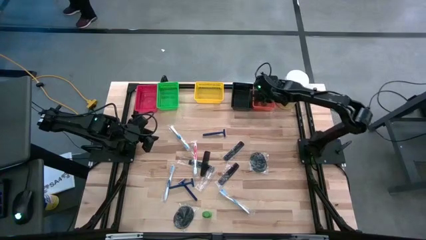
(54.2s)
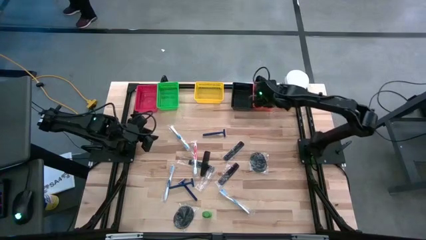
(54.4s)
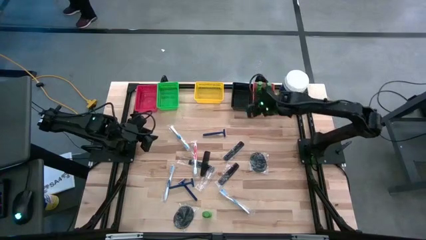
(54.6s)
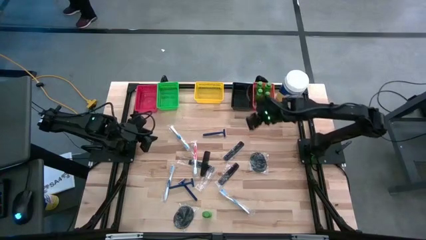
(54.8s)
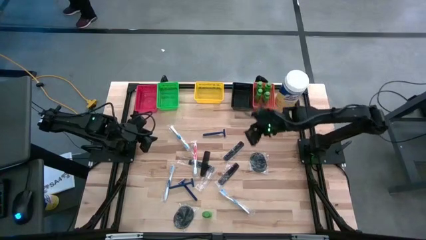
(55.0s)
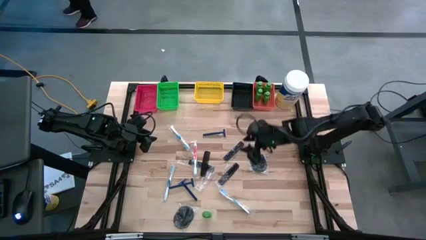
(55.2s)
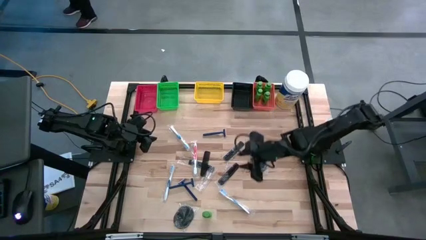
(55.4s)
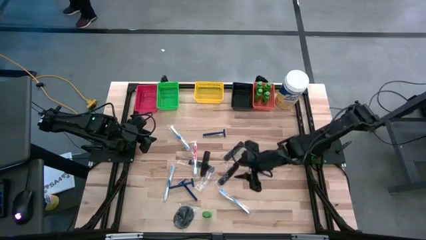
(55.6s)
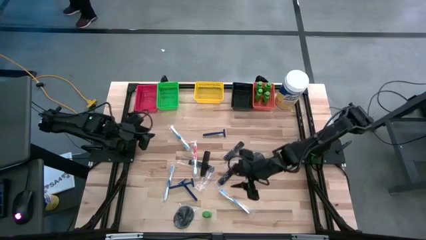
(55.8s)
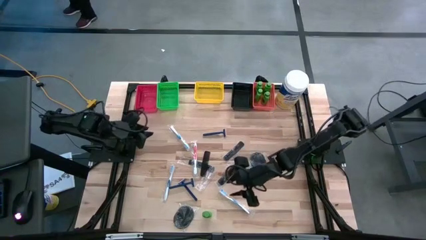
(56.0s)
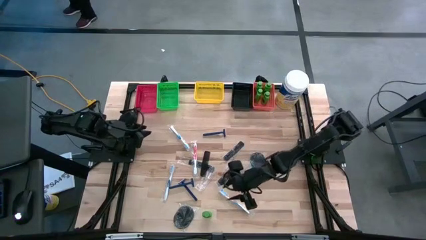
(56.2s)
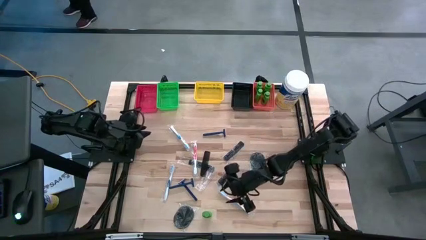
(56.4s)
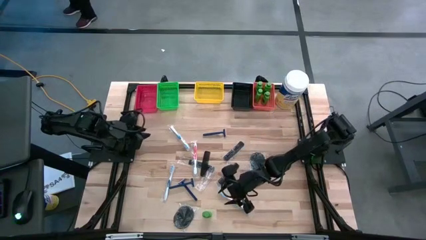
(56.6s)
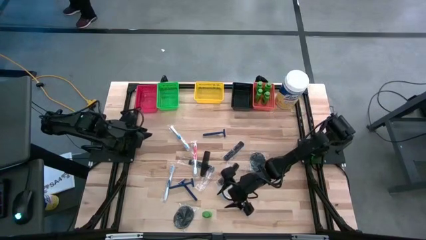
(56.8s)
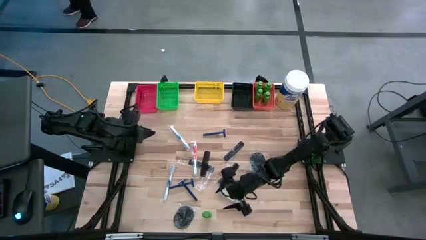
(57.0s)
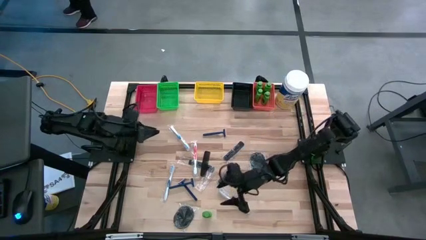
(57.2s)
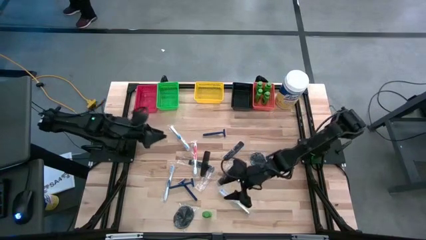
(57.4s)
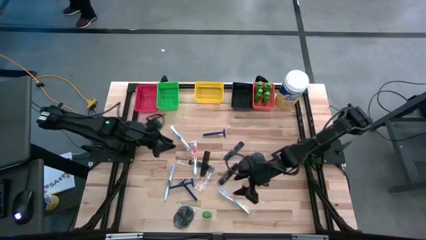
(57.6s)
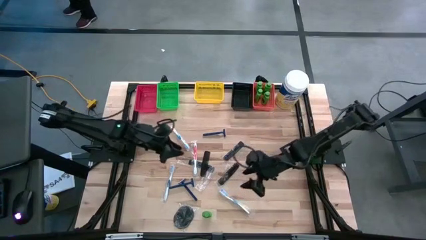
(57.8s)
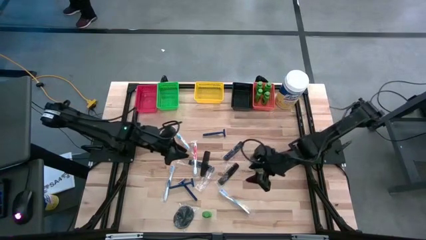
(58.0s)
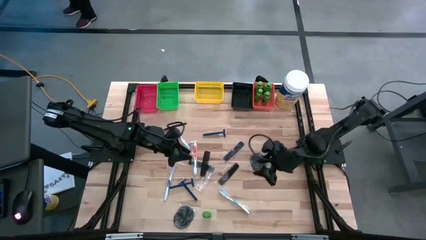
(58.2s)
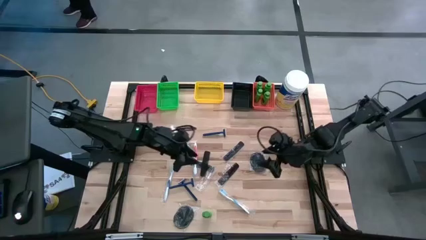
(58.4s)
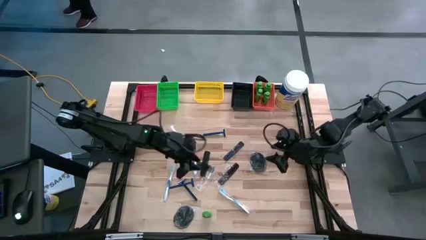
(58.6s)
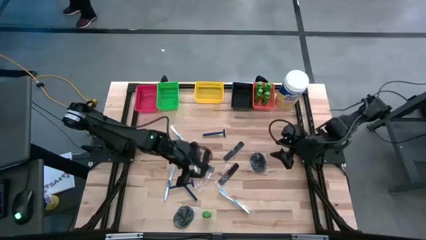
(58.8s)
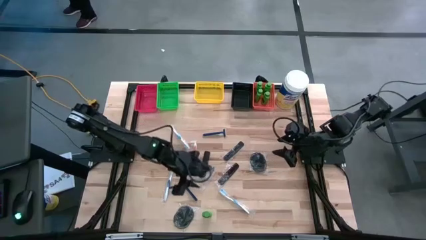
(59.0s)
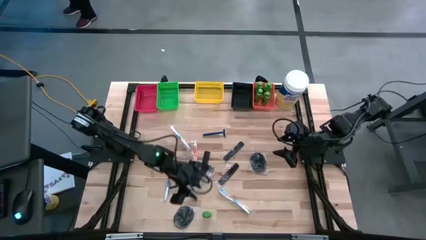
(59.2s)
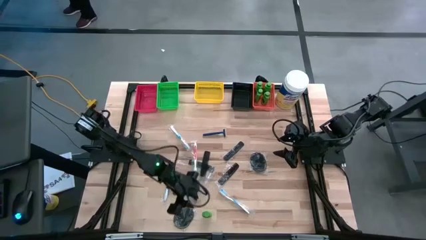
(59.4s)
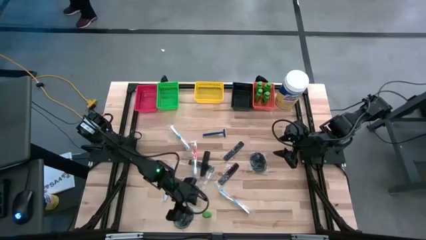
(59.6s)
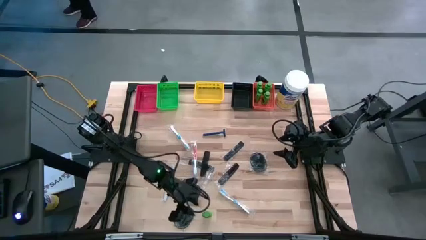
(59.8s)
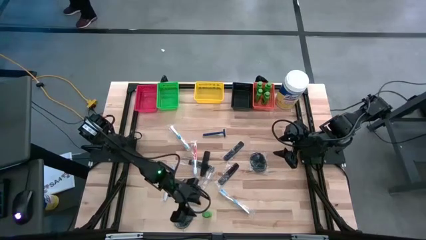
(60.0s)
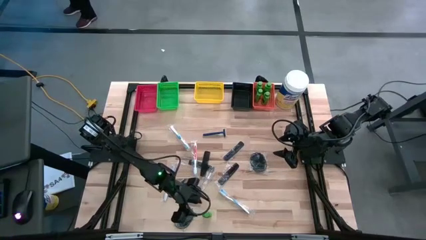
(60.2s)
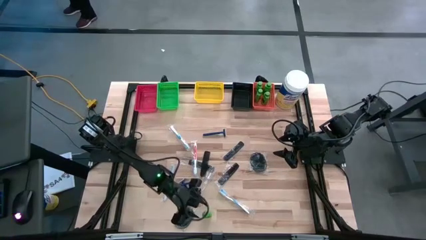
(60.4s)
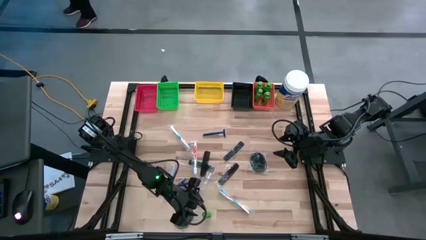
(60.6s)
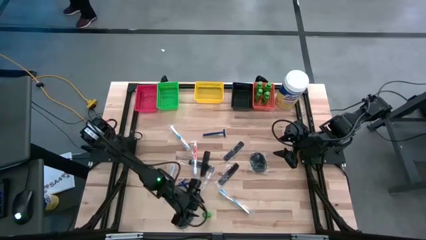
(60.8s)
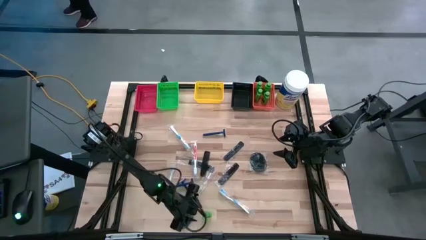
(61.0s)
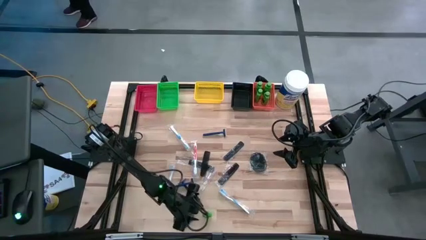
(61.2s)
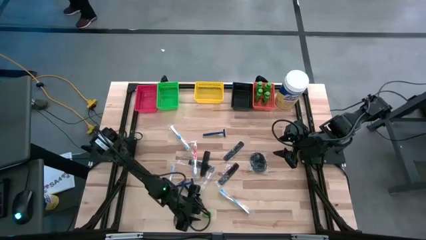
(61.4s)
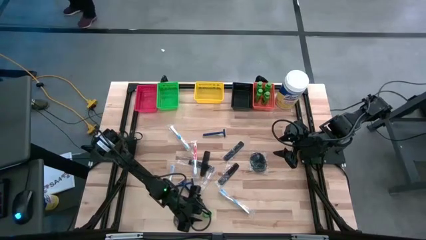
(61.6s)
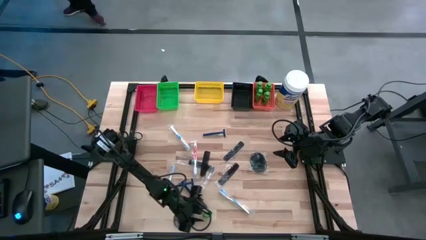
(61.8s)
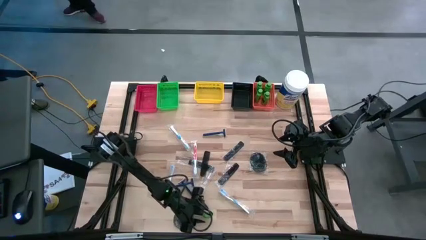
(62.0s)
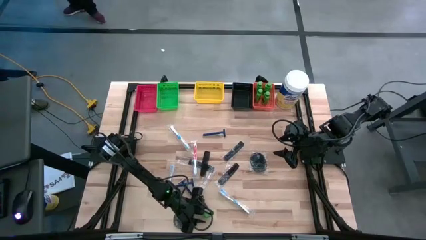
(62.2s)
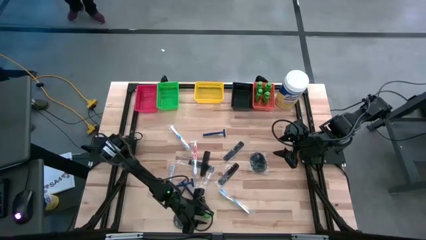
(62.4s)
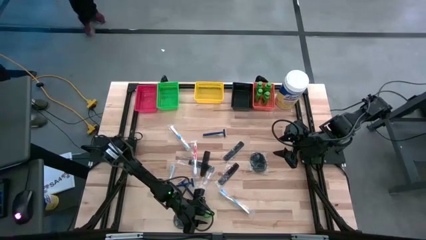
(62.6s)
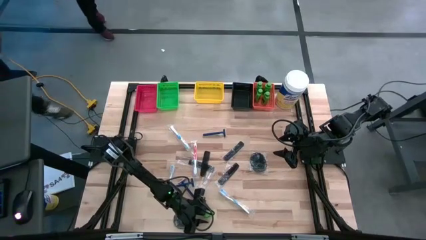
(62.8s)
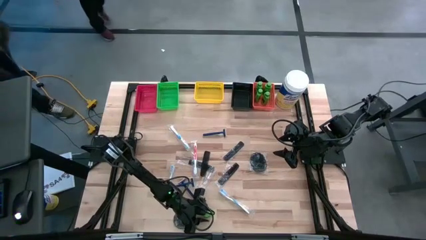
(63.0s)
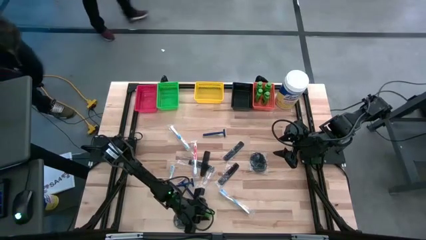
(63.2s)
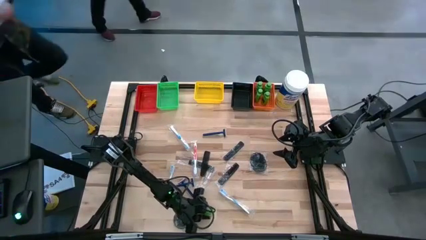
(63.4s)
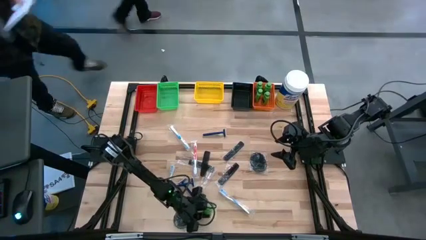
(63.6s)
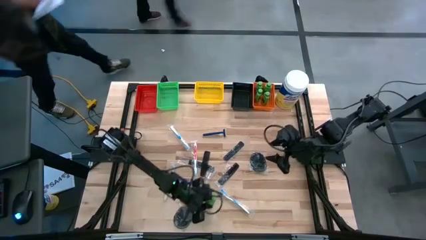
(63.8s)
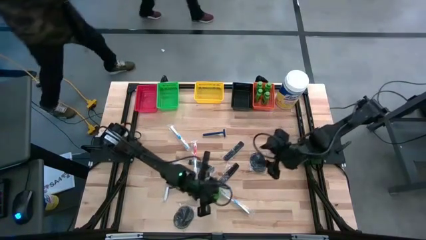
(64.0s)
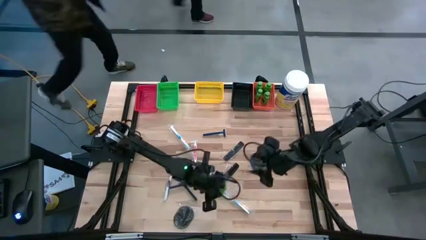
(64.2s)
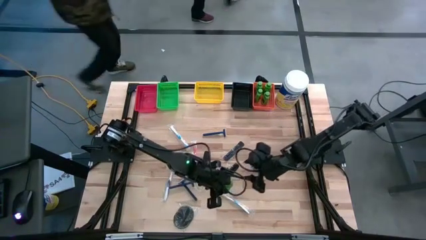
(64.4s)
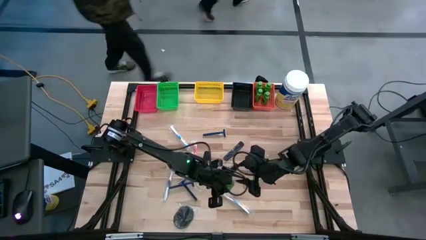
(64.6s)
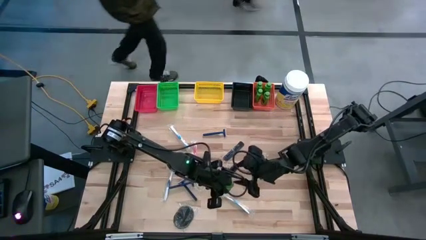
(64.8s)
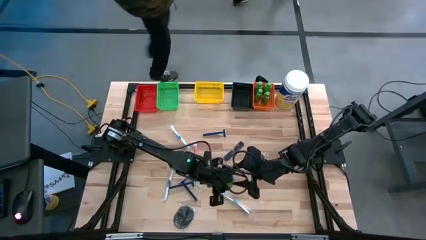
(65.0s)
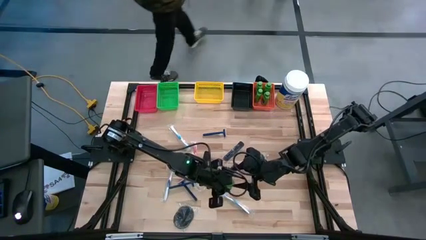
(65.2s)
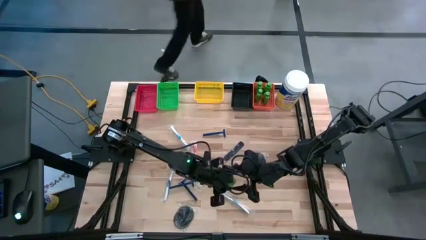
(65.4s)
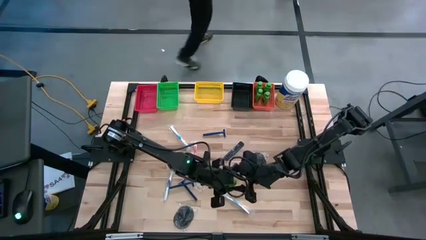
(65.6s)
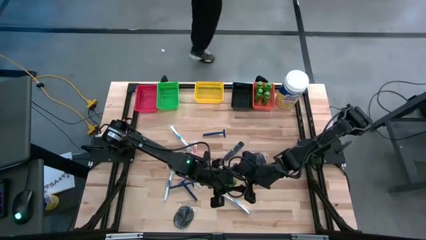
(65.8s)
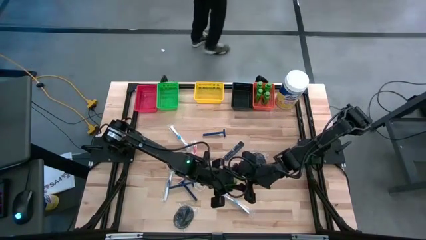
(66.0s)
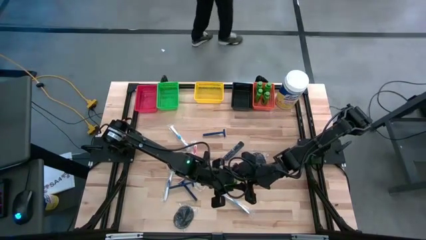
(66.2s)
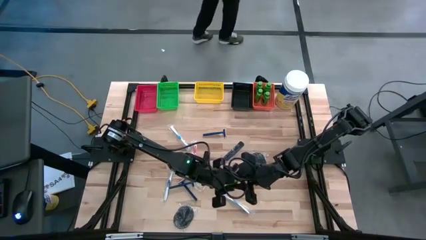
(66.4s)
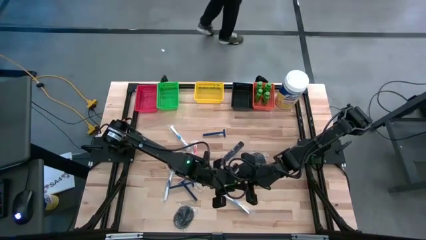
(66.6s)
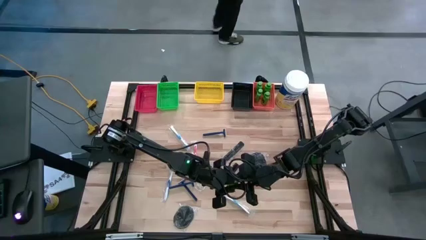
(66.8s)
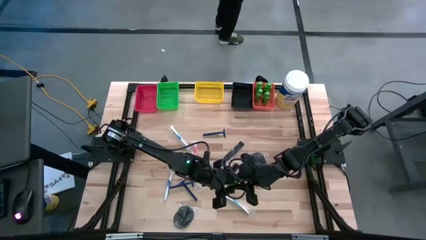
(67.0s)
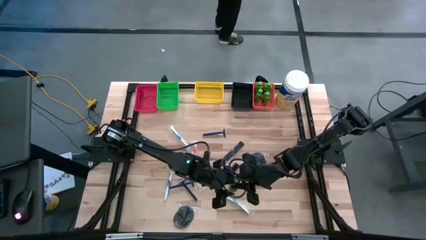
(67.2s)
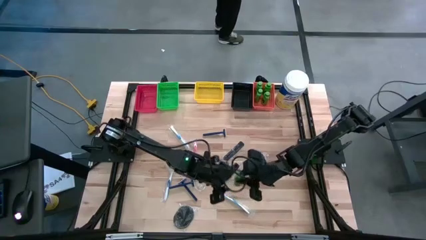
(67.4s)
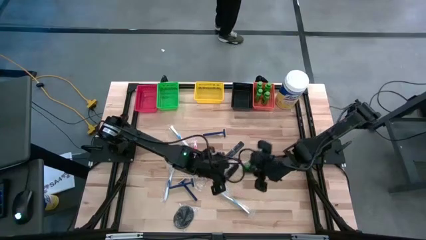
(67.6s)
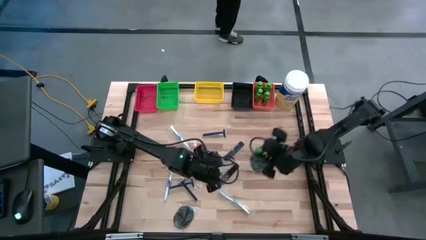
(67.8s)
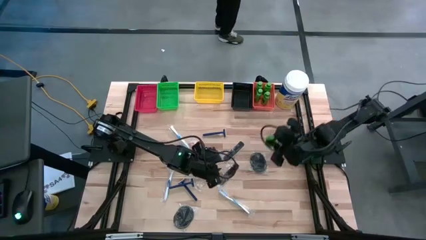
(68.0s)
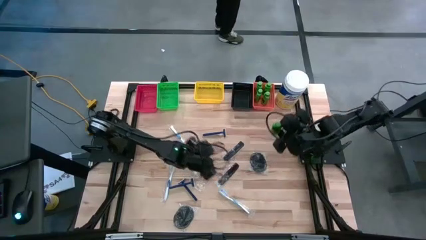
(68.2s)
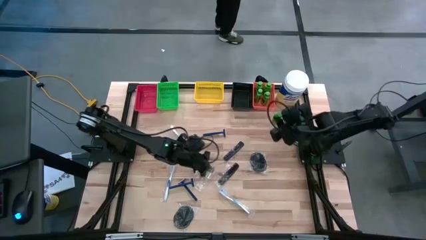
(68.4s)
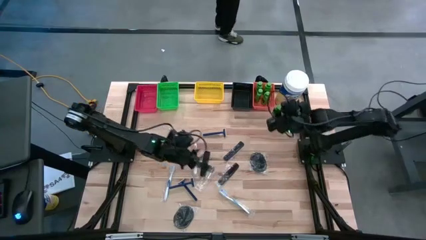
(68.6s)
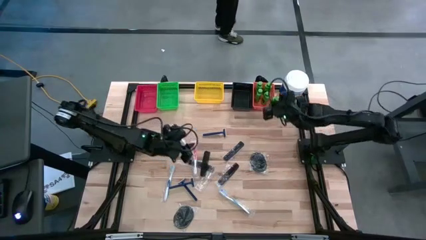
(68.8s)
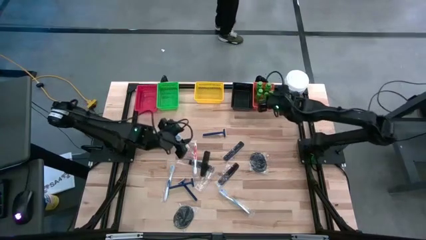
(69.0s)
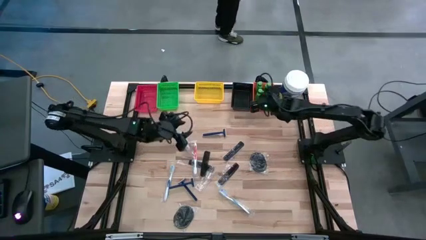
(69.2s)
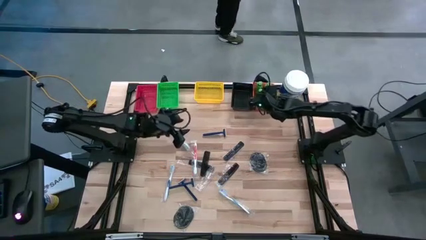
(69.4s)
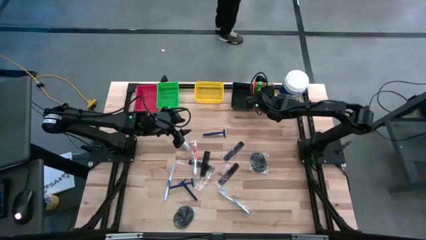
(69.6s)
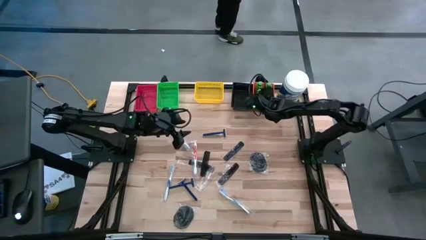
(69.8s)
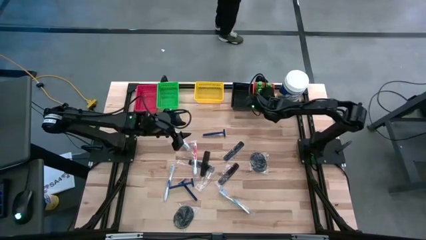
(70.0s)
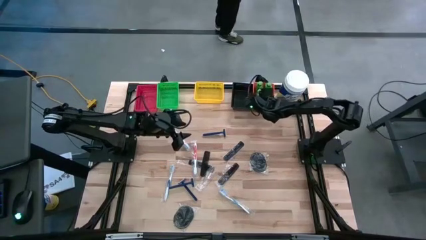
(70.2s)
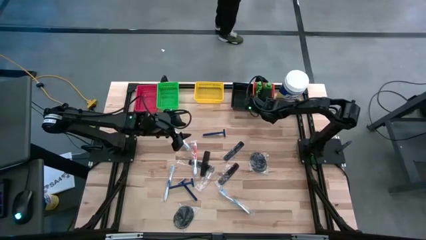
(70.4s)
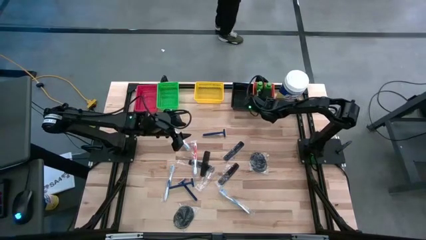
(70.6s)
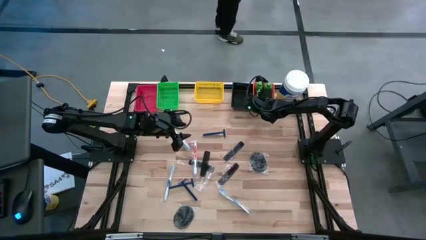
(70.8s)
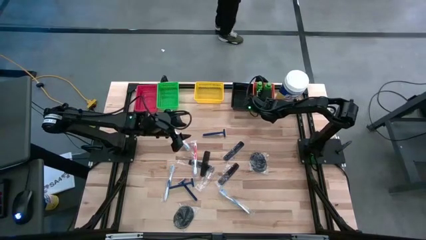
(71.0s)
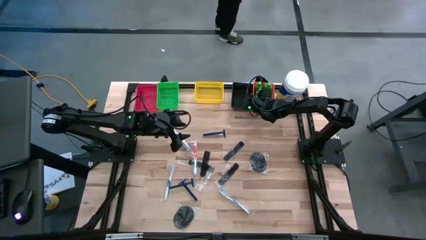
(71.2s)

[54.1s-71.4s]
Task: Pick & Place Travel size toiletries
Put the green shampoo bottle into the orange bin
